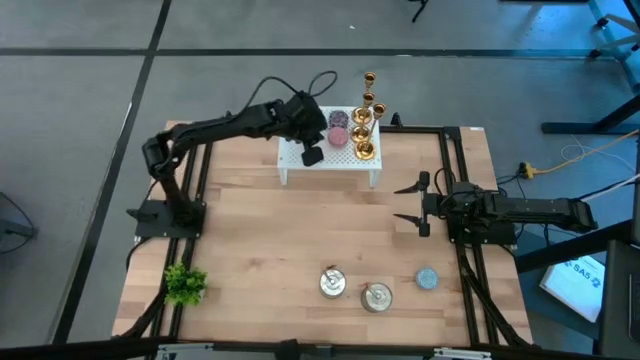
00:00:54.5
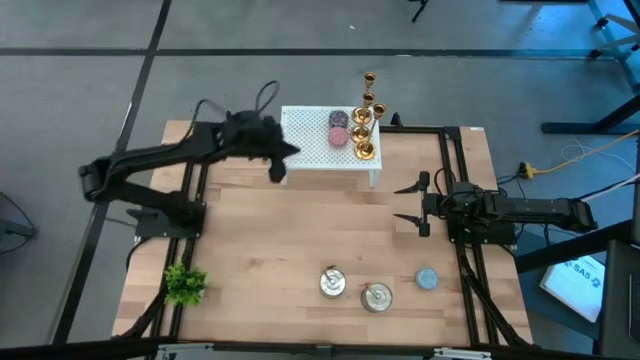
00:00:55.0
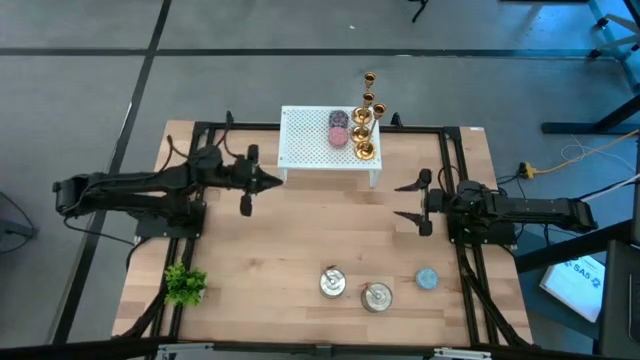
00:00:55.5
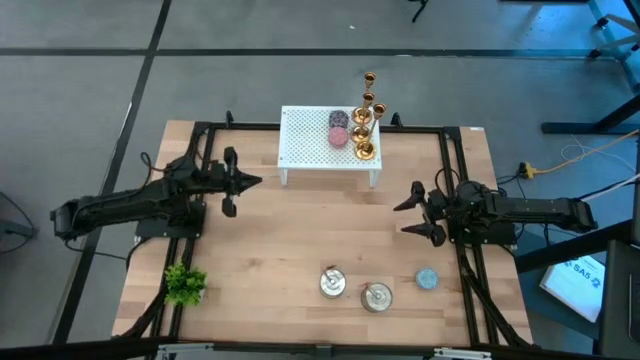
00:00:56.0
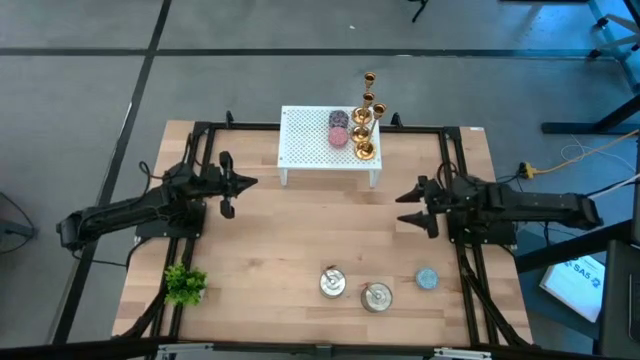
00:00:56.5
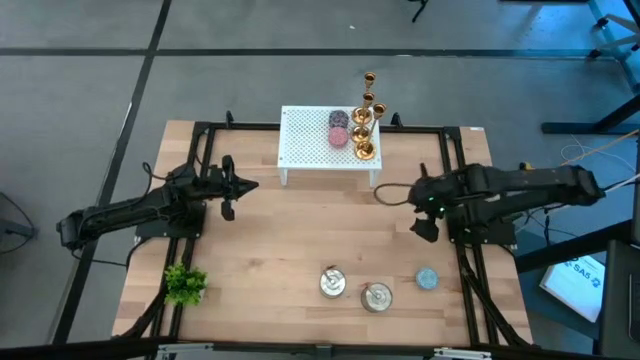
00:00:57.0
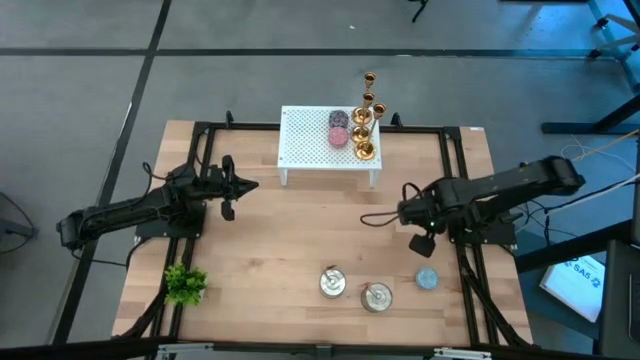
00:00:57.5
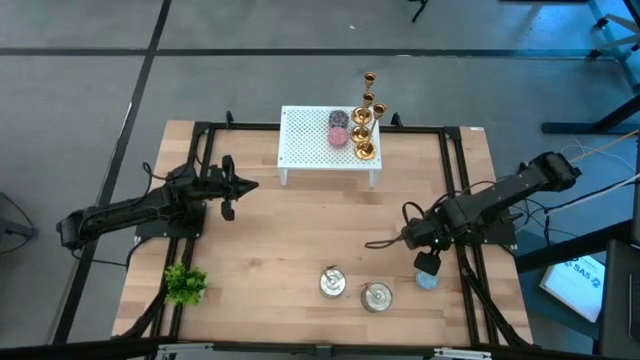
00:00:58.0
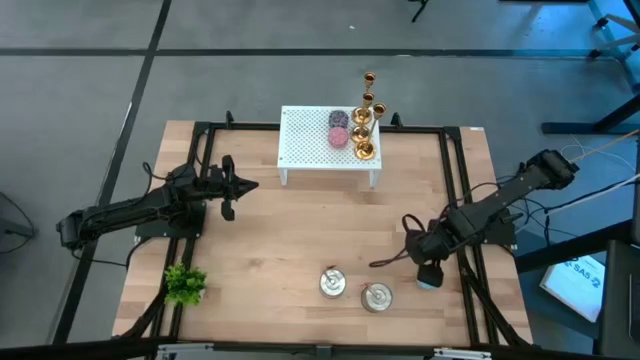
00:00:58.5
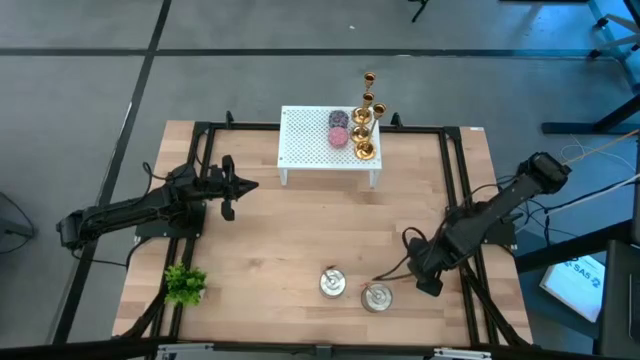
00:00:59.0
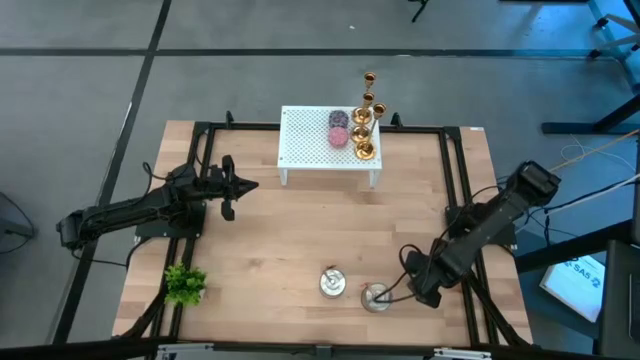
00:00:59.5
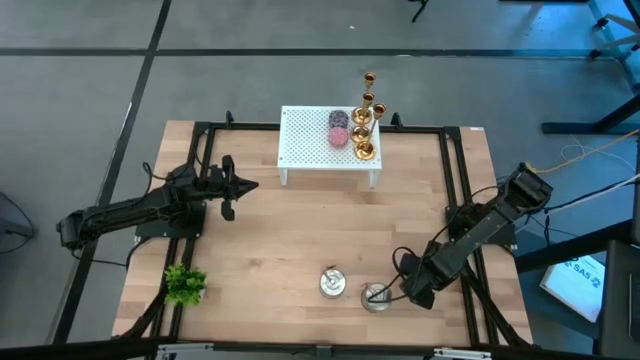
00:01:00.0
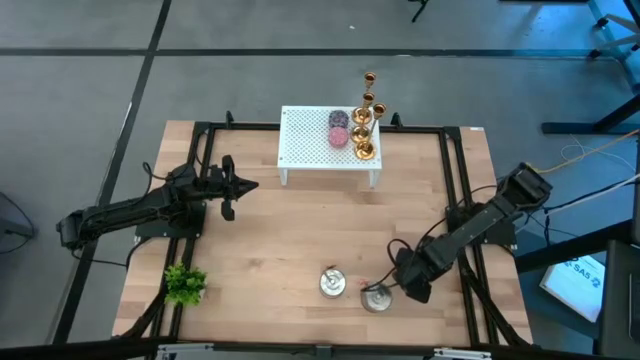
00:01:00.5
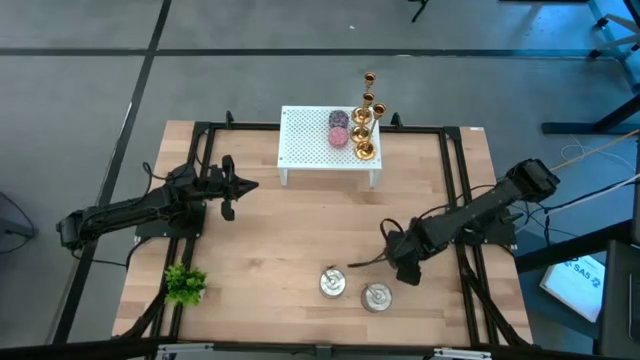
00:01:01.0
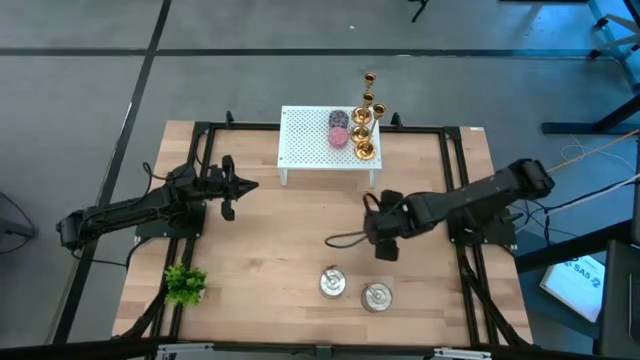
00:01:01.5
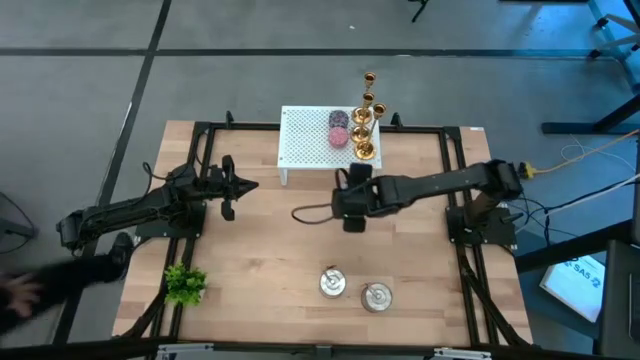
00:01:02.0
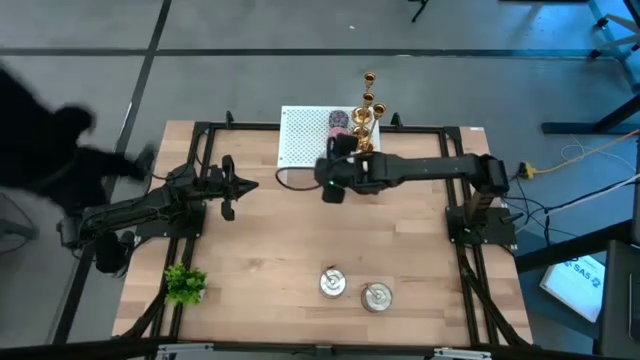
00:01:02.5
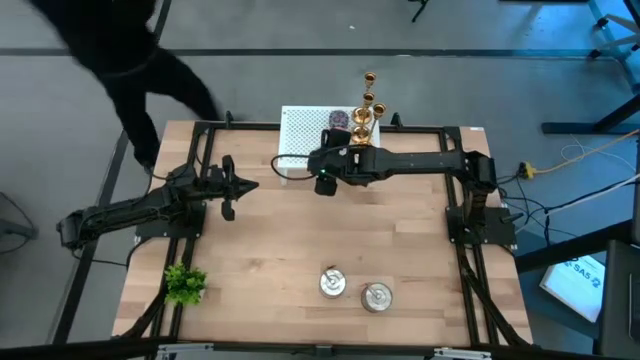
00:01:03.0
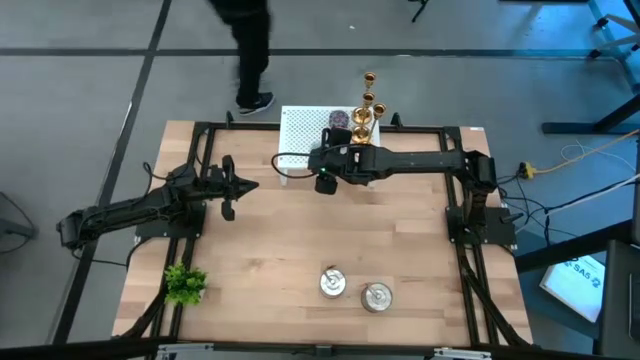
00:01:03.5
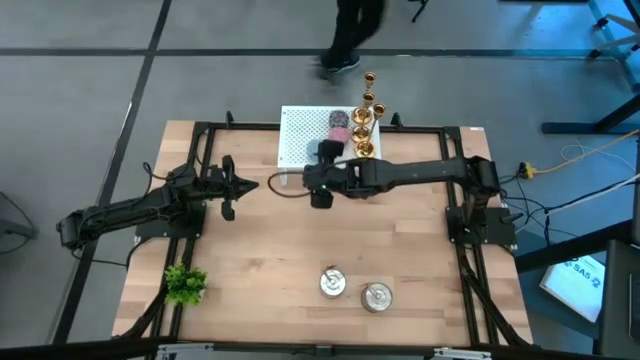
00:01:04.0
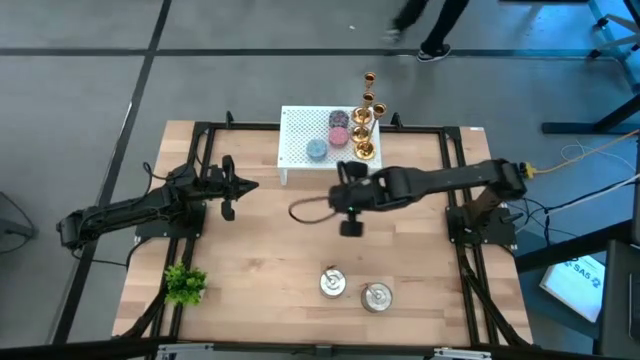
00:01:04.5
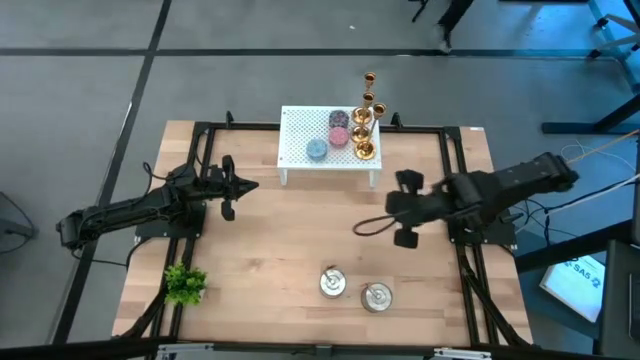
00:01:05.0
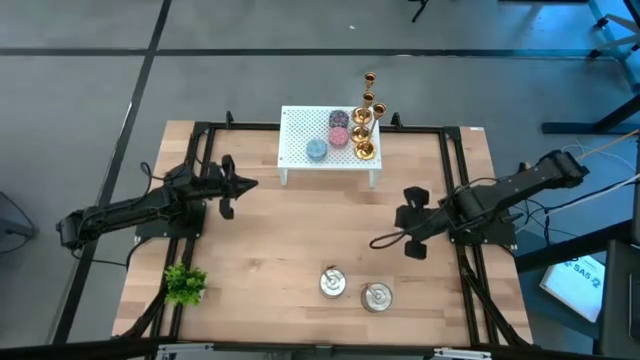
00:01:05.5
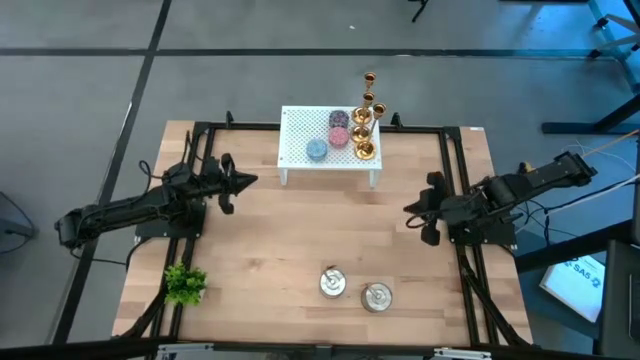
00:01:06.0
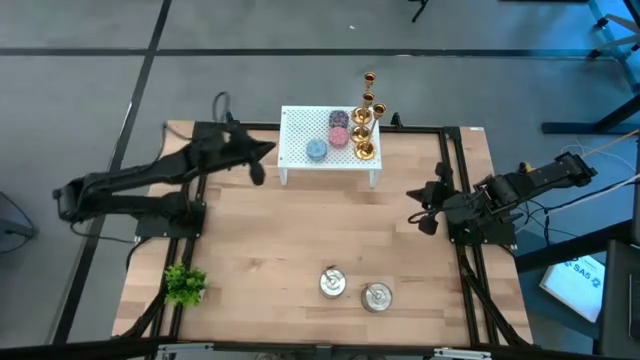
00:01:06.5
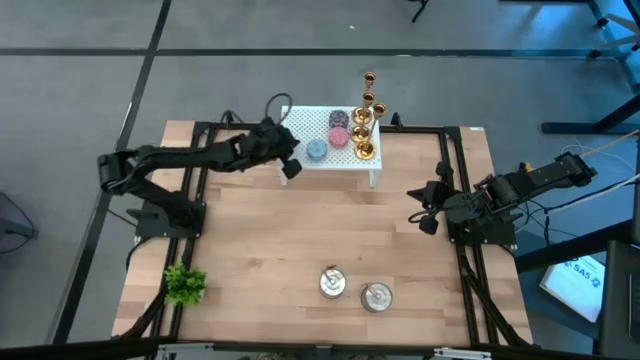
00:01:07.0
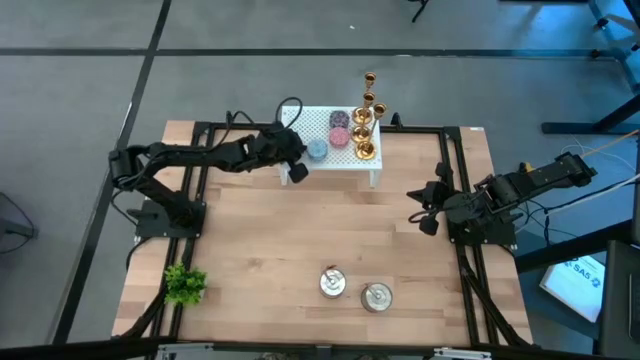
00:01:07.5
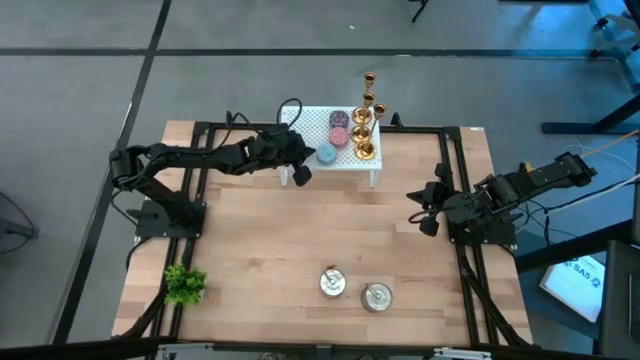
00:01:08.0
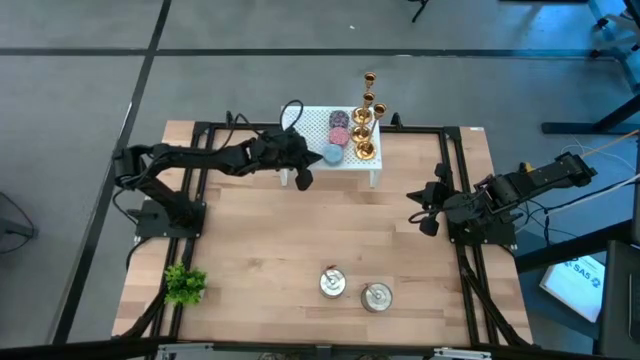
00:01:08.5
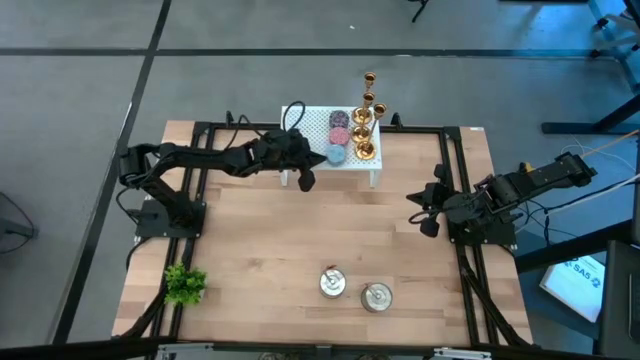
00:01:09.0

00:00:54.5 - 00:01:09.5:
Task: Pick & Place candle stick holders
Put the light blue patterned scented candle on the shelf and align it with the pink patterned scented candle

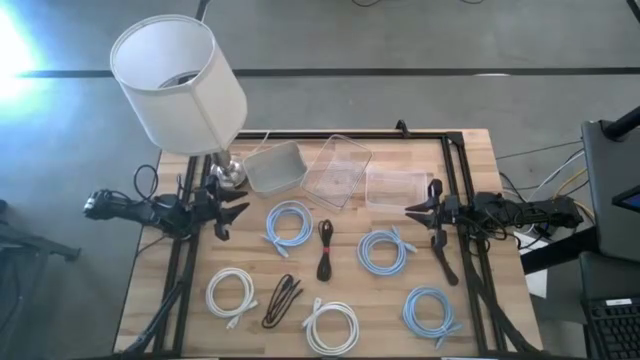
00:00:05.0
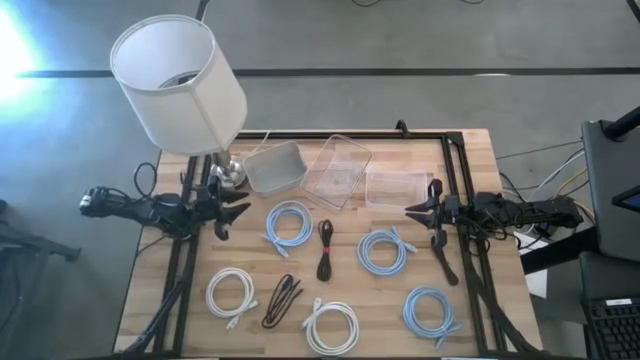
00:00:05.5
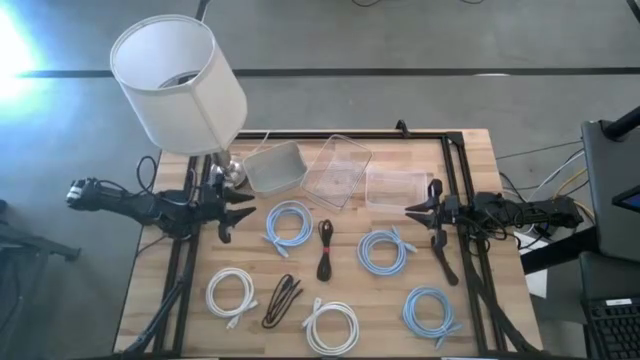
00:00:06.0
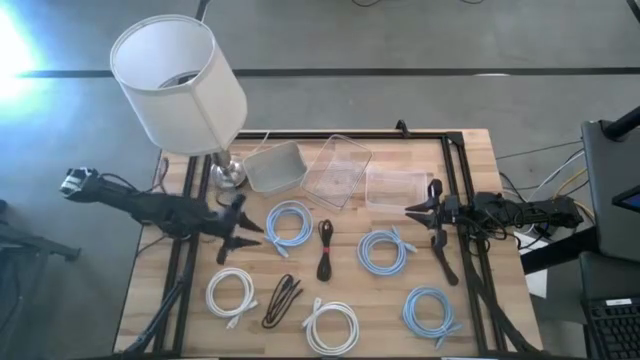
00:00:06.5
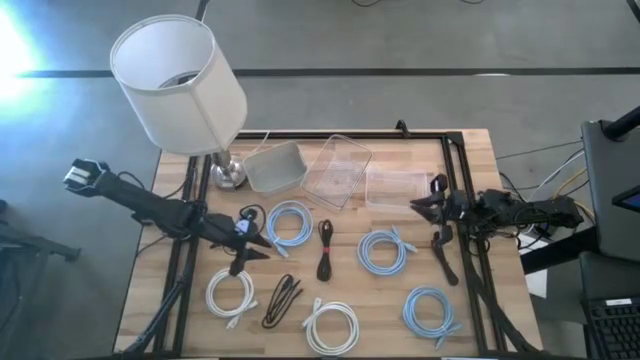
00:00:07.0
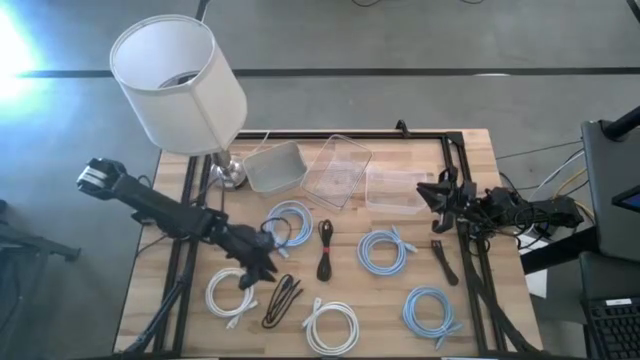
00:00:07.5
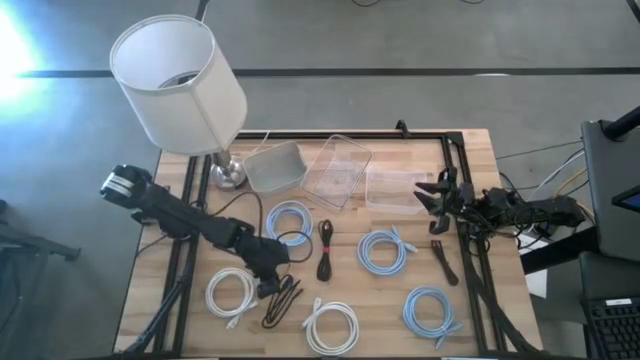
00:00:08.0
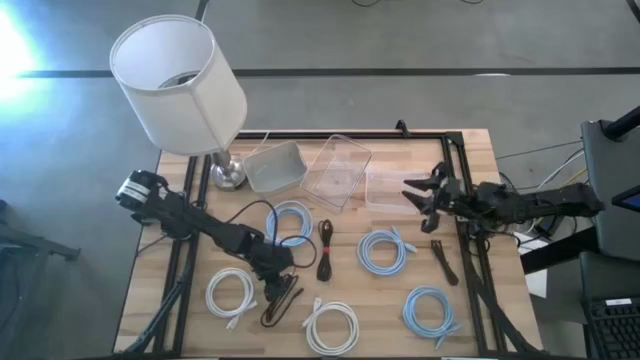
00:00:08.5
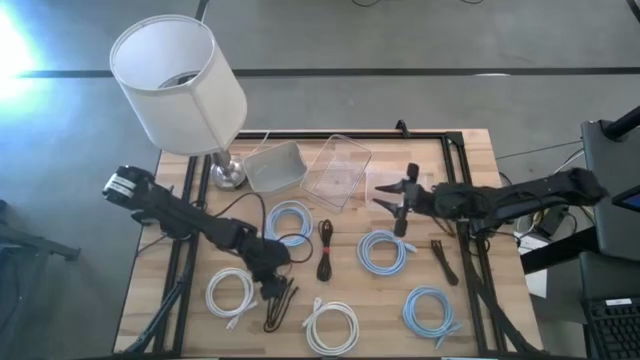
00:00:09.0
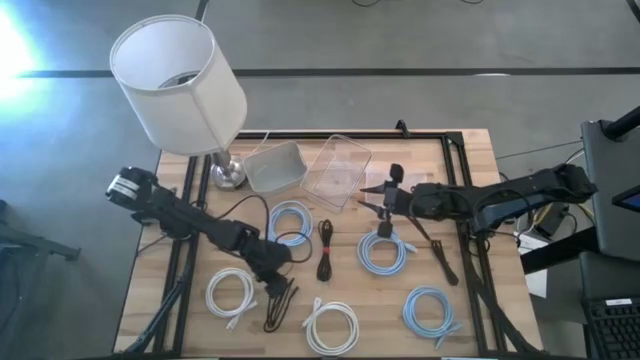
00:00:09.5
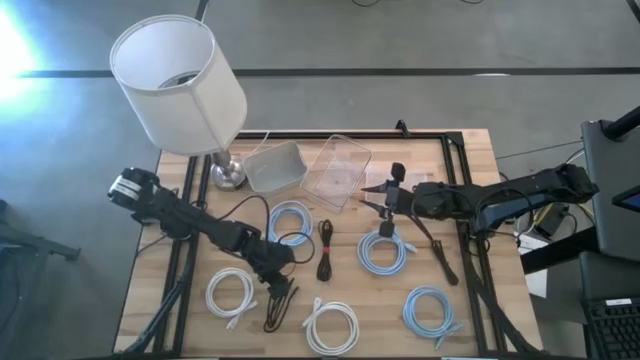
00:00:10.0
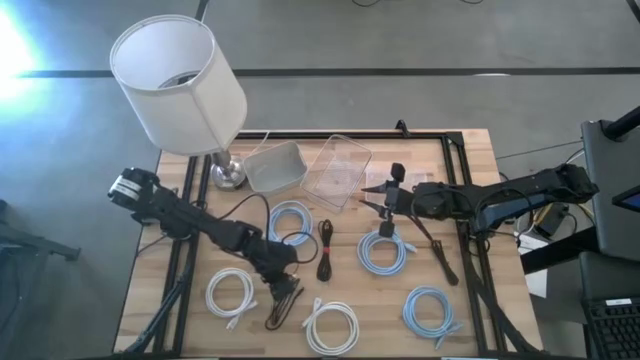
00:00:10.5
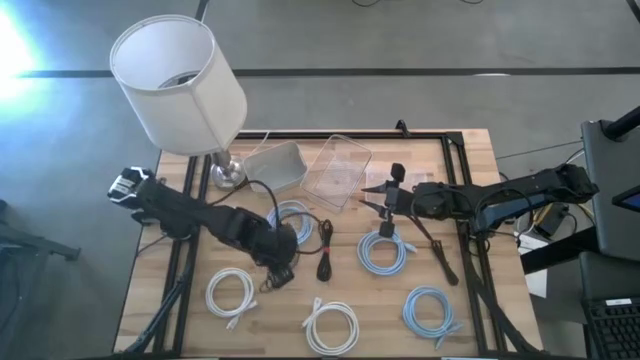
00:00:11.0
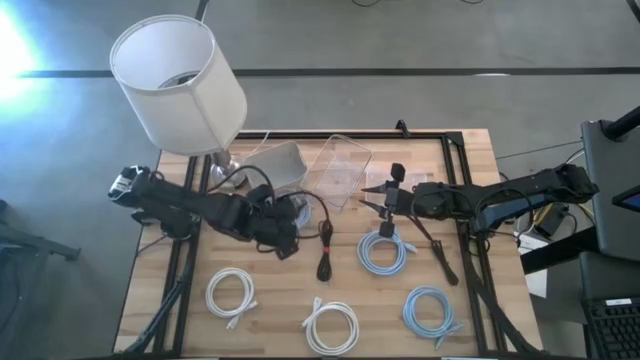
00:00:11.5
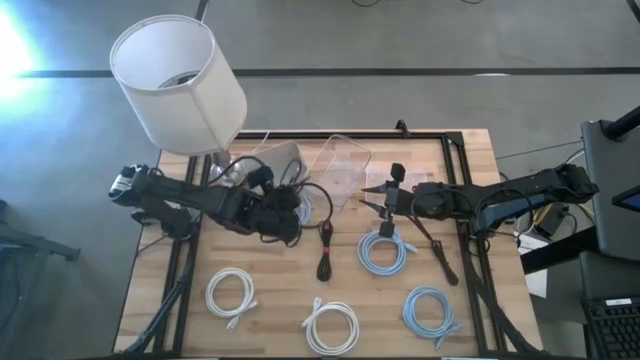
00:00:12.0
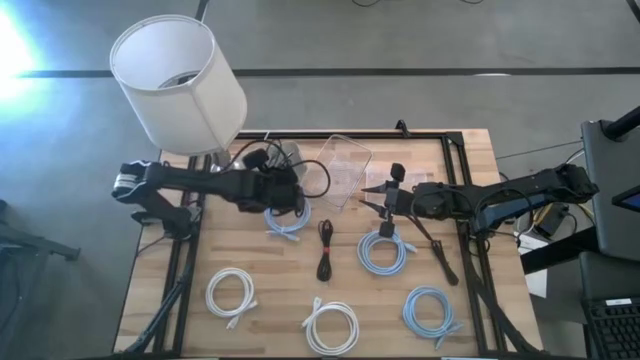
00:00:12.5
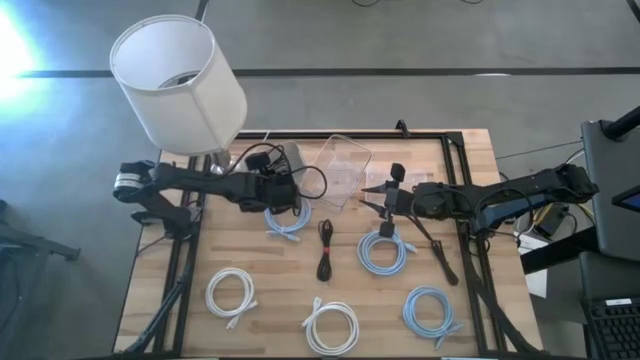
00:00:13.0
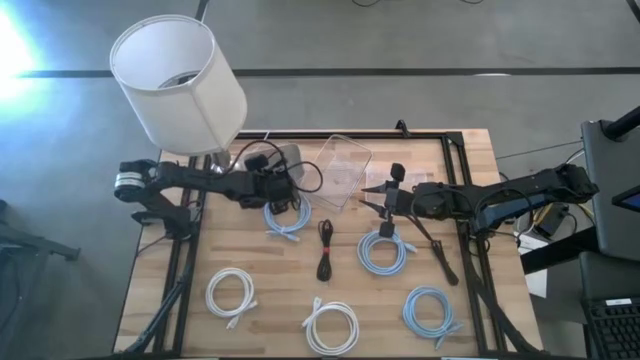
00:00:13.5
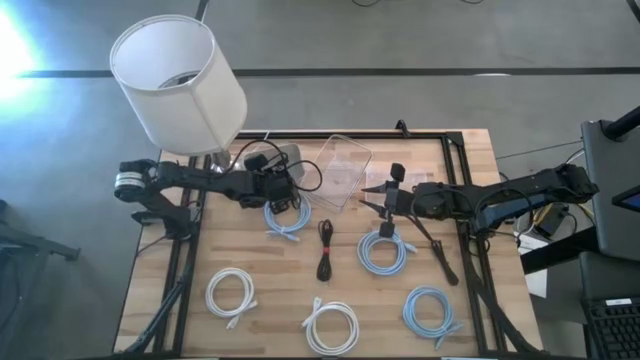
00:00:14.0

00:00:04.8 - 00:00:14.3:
Task: Pick & Place USB Port
Put the bottom black USB cable into the white bin
